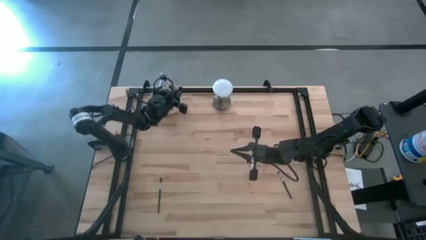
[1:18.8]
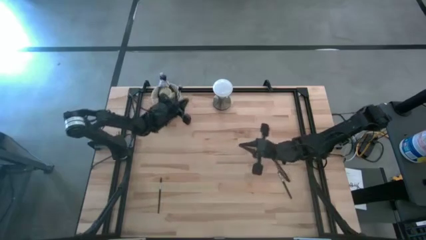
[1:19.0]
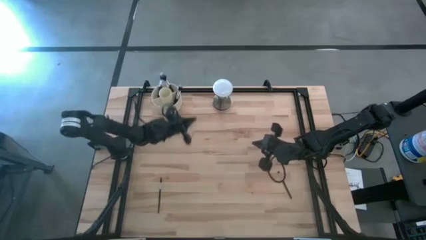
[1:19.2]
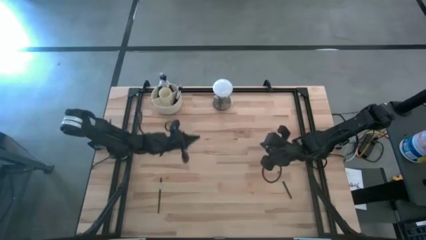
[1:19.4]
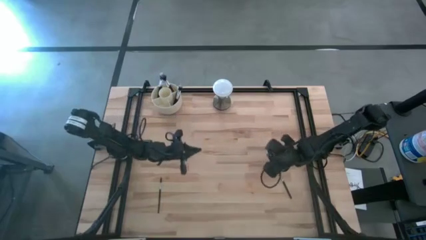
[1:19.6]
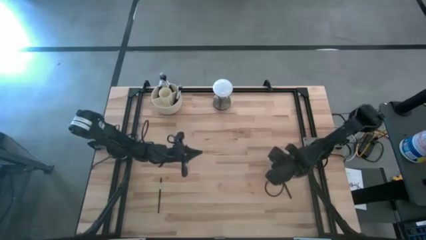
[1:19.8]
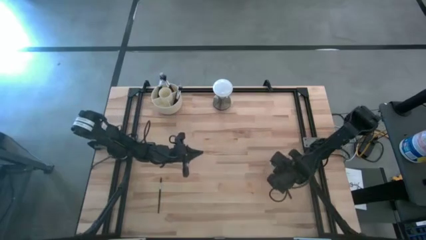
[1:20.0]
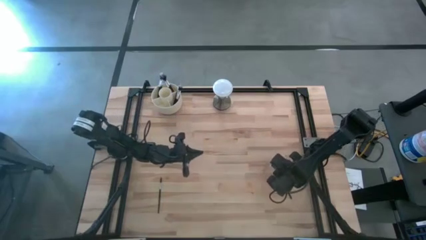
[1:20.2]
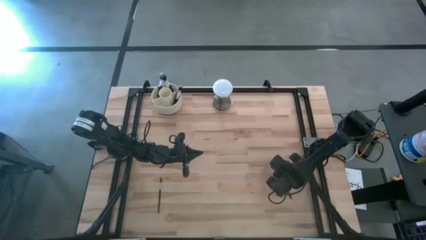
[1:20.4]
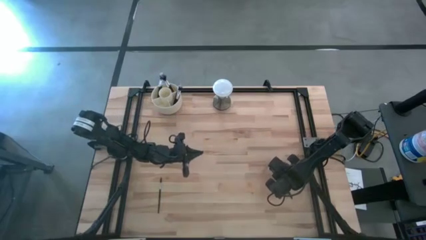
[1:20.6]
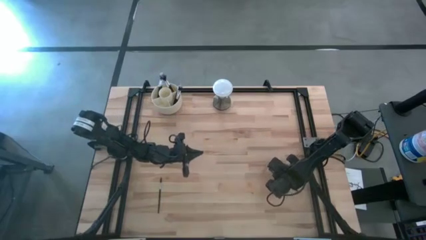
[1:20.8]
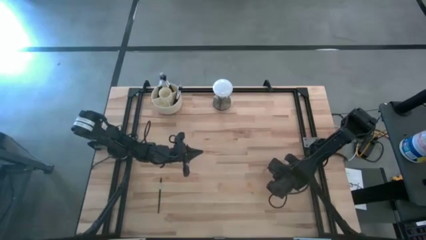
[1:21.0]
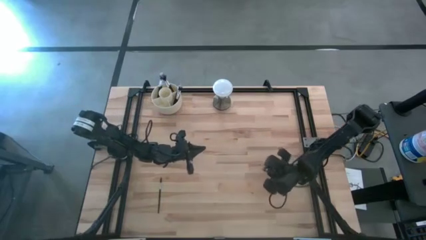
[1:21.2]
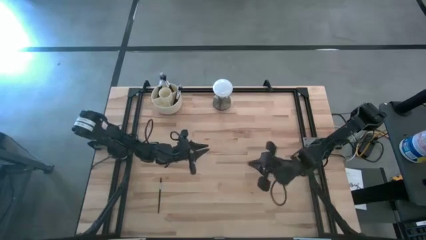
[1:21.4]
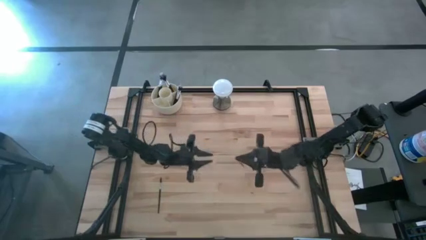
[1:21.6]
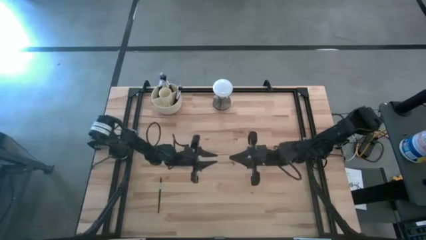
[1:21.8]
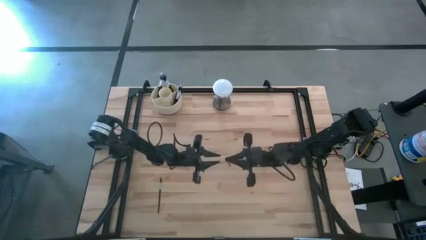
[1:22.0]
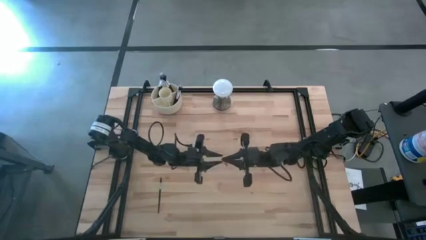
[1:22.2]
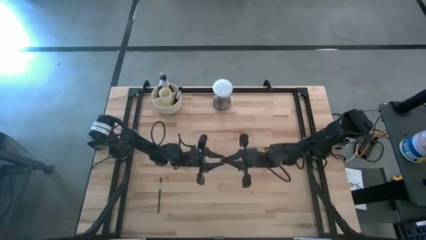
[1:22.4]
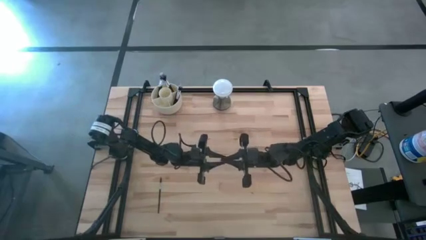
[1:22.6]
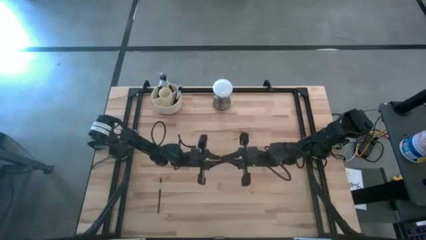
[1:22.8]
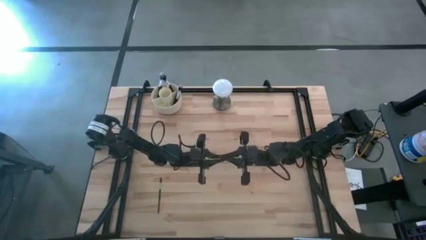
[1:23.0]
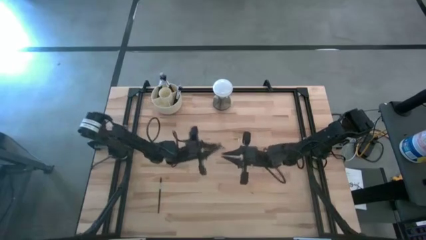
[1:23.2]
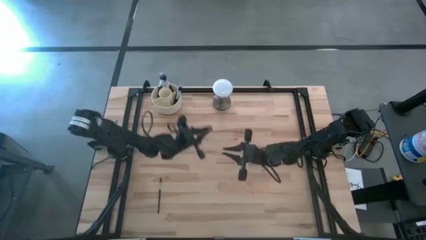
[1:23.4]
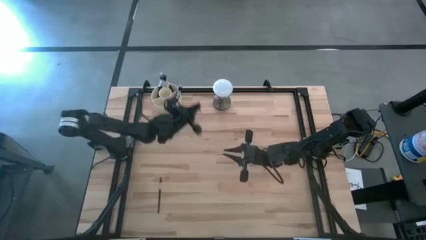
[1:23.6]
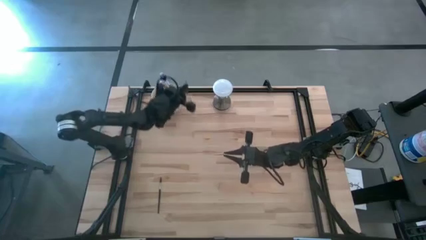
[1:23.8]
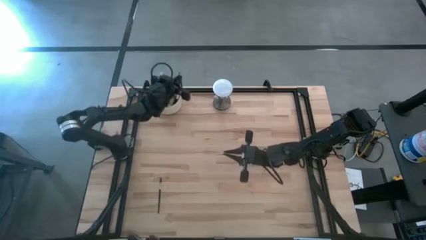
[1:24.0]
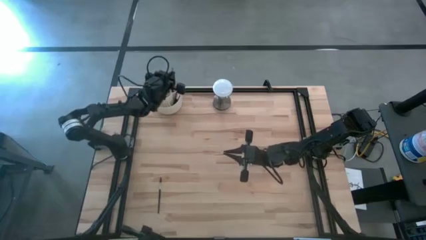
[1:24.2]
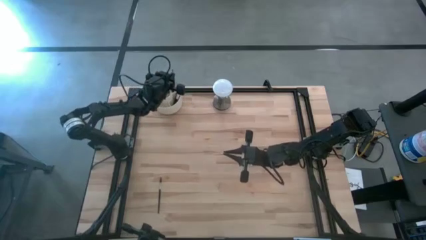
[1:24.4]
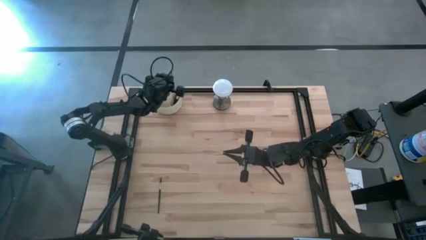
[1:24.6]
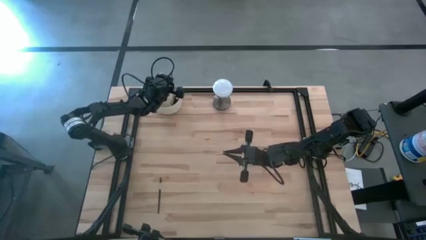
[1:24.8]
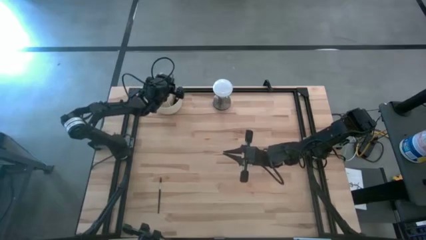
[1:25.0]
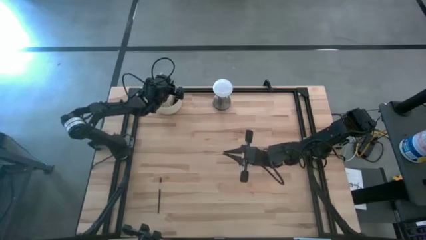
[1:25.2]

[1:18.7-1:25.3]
Task: Put items in baskets/containers
Put the eyeshadow brush into the organizer

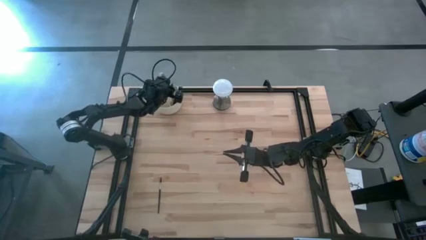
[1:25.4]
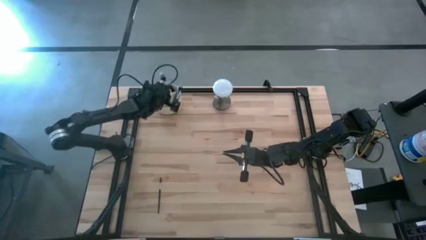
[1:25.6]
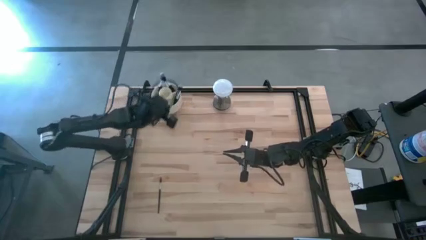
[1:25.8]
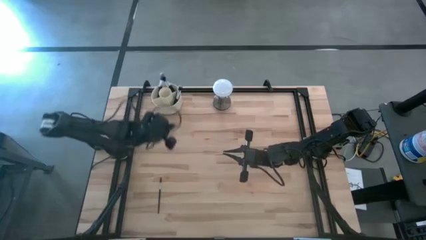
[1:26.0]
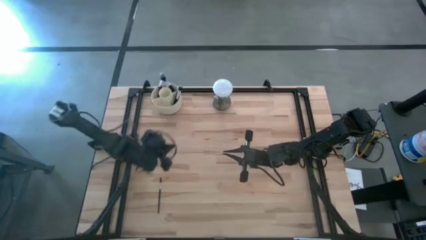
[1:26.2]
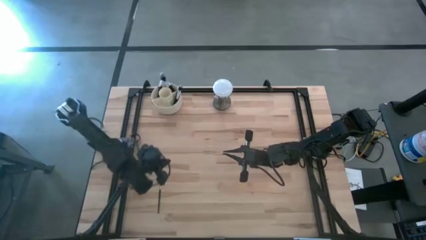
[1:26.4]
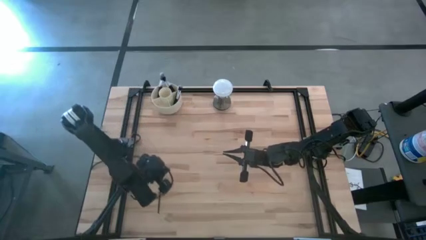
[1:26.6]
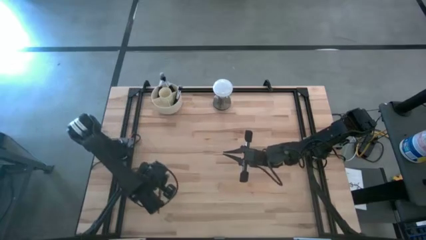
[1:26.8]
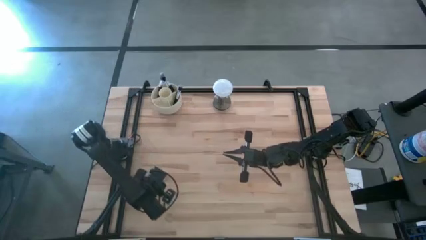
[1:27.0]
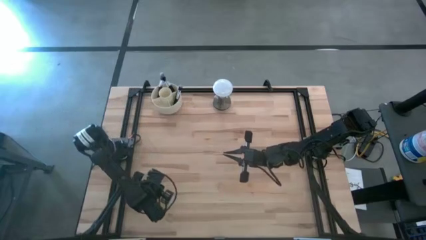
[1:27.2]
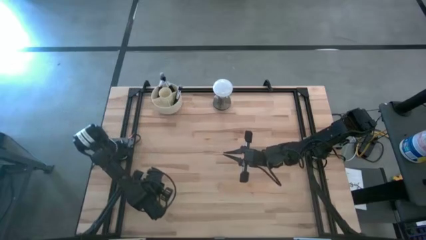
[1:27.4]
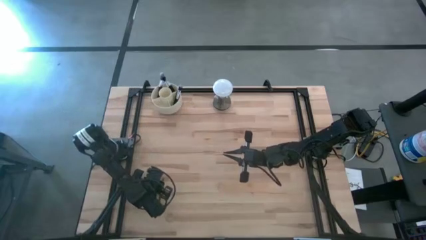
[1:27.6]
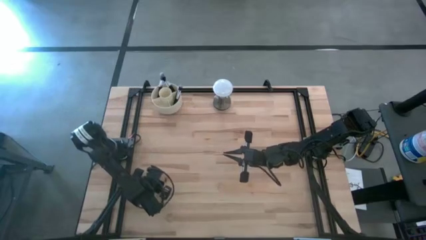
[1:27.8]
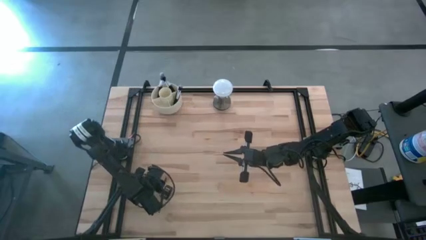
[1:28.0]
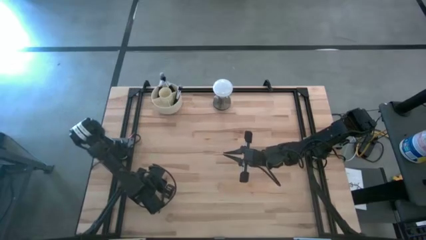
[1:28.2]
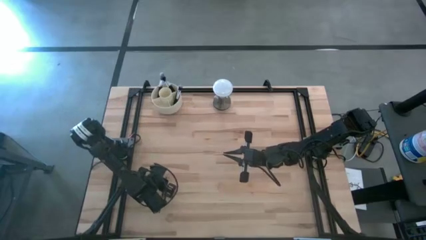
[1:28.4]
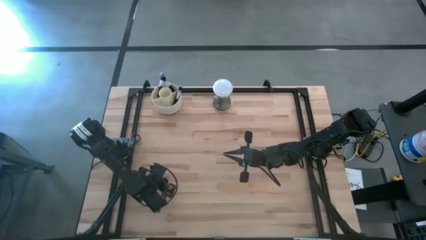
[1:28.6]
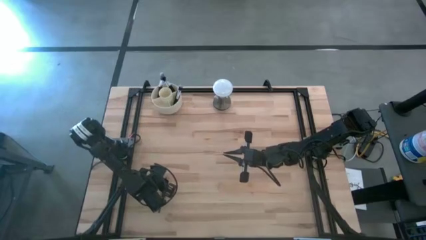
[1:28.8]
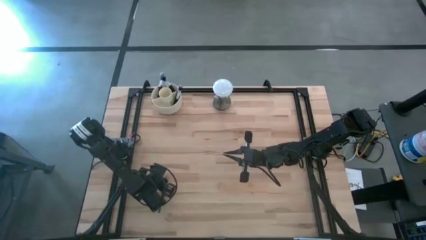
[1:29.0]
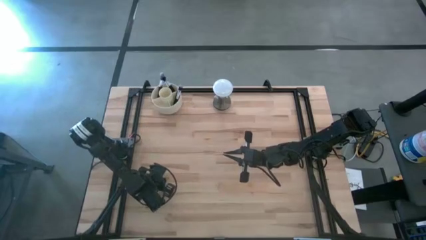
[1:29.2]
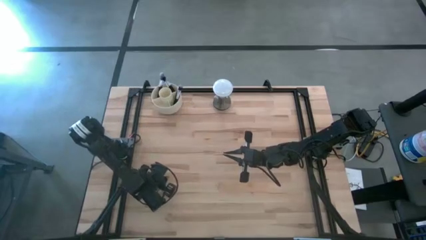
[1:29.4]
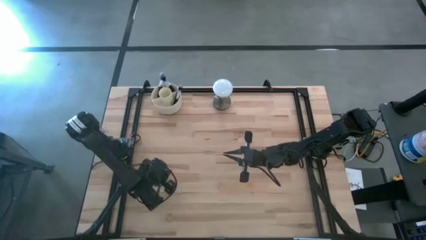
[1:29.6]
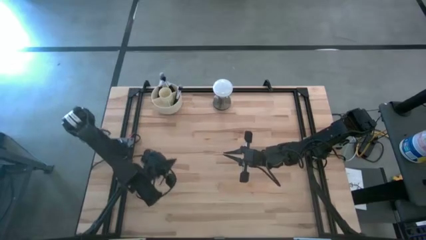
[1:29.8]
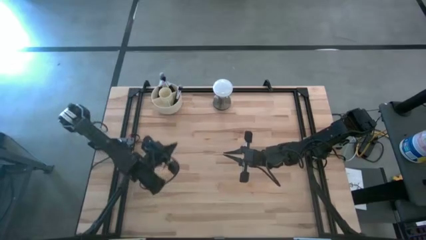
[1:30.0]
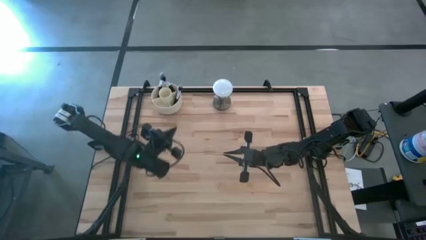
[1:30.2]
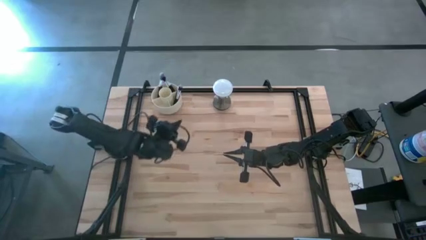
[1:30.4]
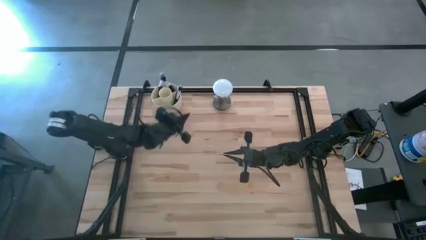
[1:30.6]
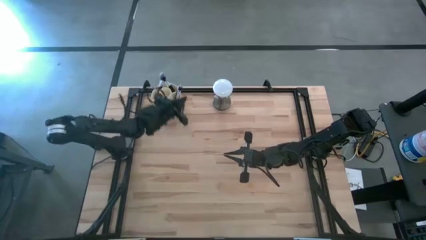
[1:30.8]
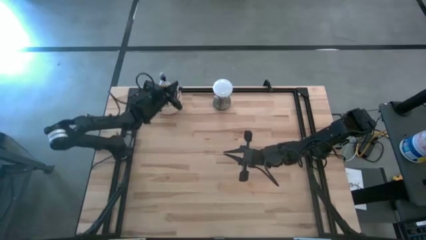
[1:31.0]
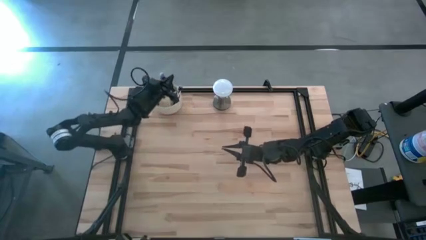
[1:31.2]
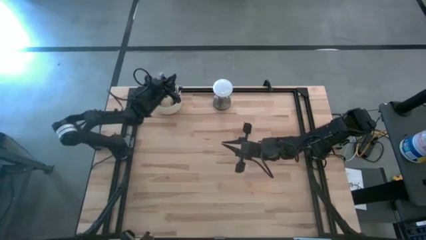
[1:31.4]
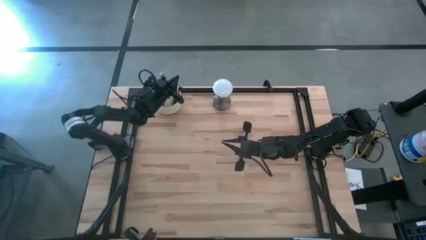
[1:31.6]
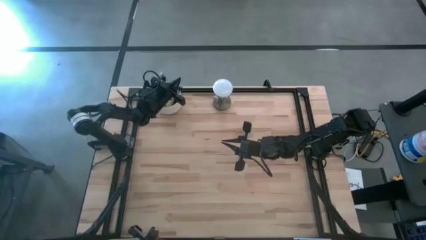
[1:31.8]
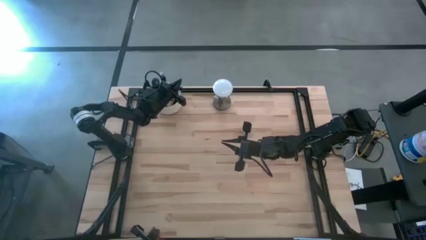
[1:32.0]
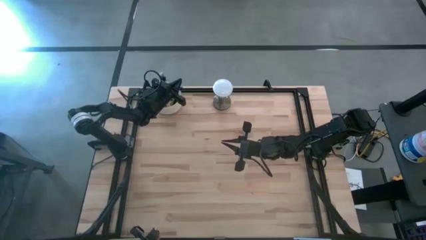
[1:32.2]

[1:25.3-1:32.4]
Put the lash brush into the organizer

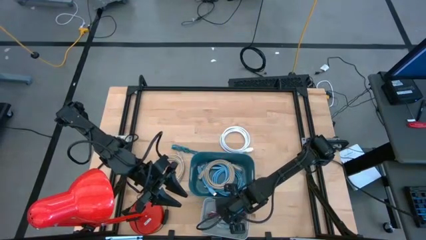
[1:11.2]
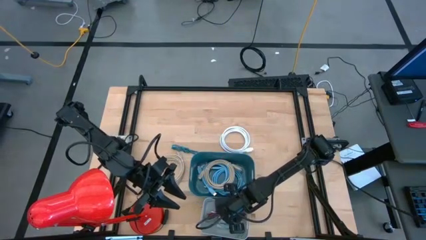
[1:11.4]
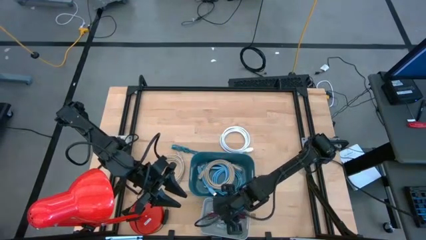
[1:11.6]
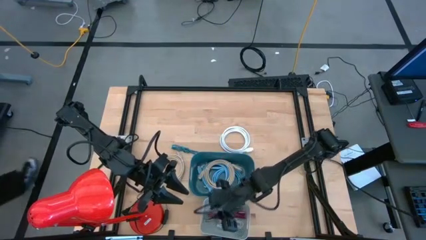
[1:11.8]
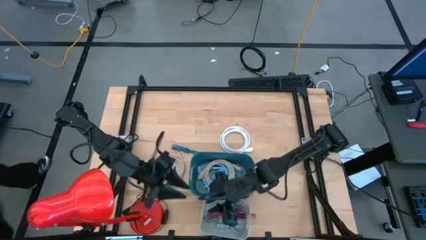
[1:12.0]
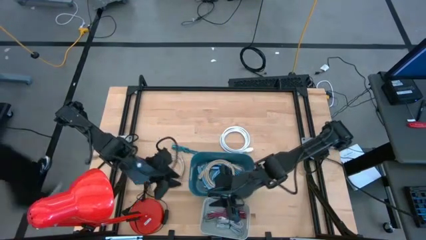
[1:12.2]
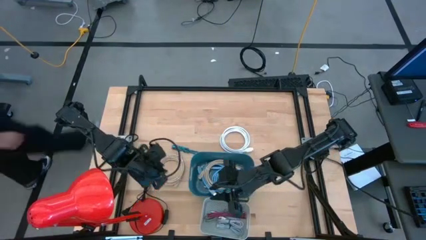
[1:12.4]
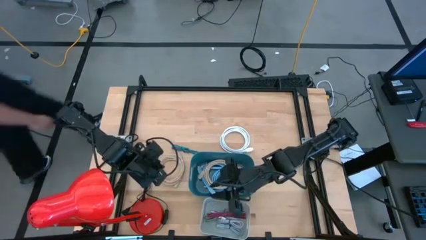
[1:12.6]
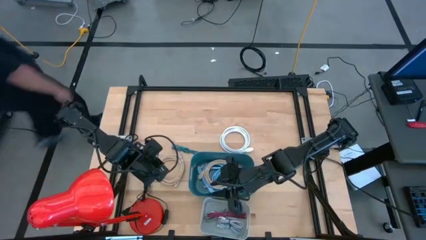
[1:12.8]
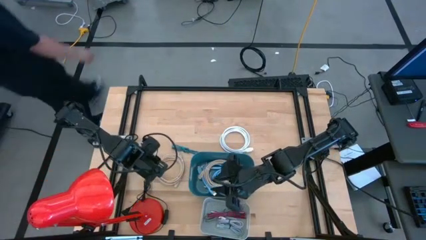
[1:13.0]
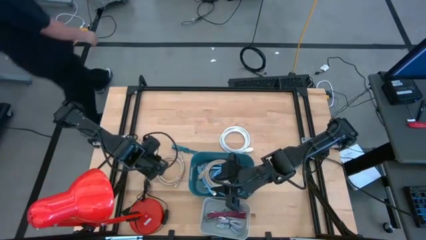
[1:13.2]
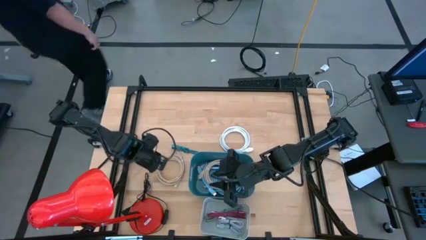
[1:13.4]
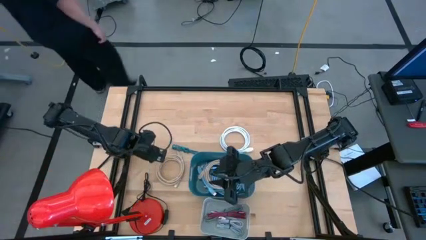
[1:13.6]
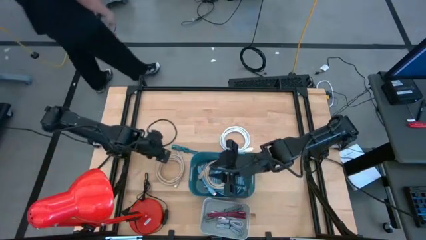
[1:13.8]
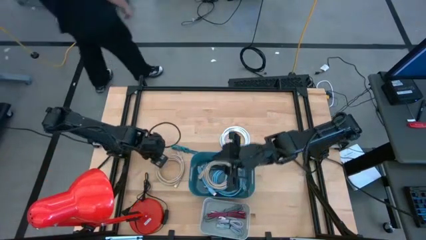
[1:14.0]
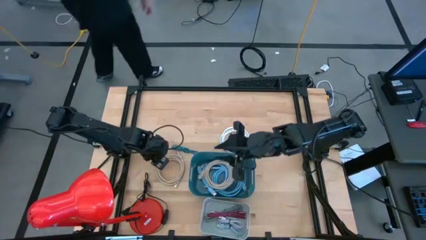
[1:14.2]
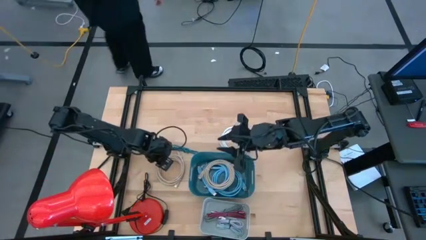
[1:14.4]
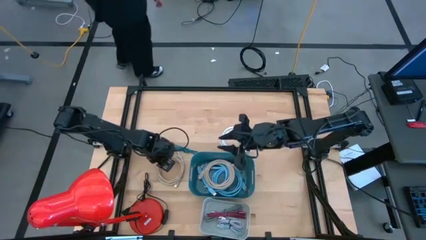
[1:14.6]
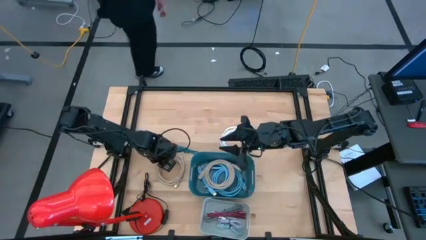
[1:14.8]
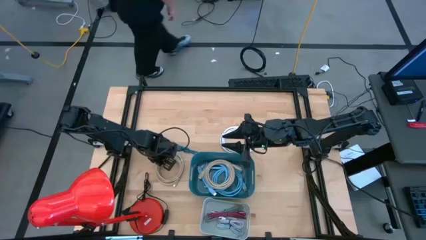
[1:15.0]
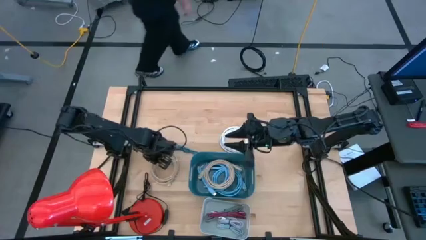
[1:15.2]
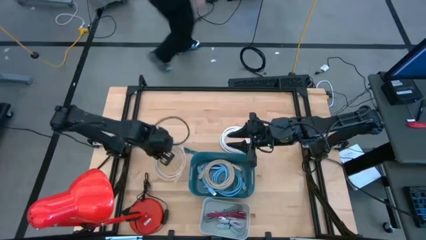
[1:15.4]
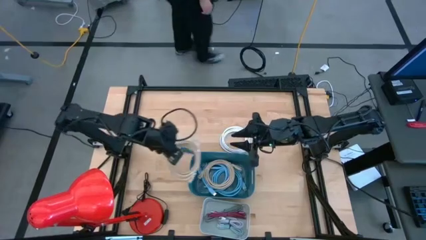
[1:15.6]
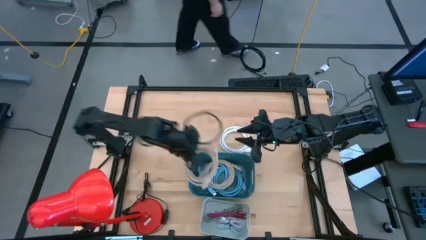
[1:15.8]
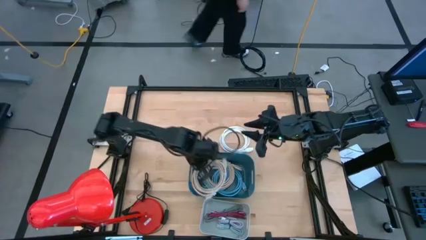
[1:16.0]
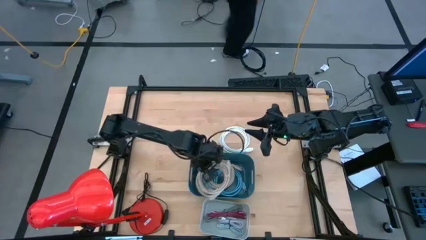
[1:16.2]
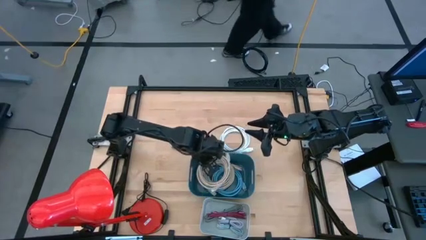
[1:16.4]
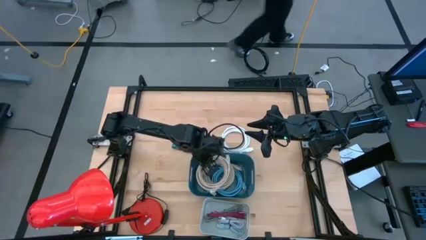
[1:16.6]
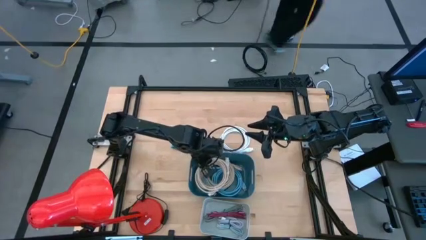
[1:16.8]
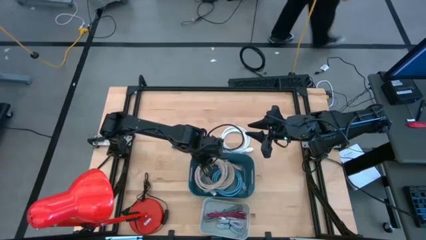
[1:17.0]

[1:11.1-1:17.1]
Task: Pick & Place USB Port
Put the brown HDMI cable into the blue bin
